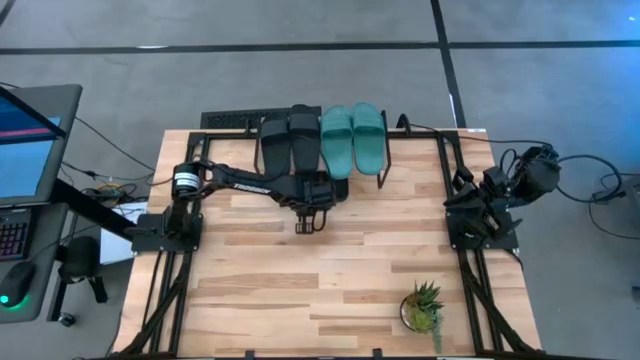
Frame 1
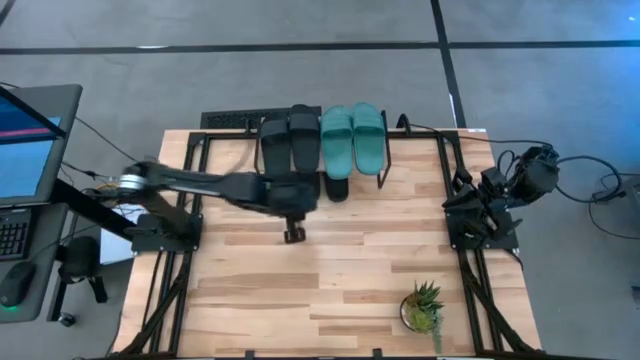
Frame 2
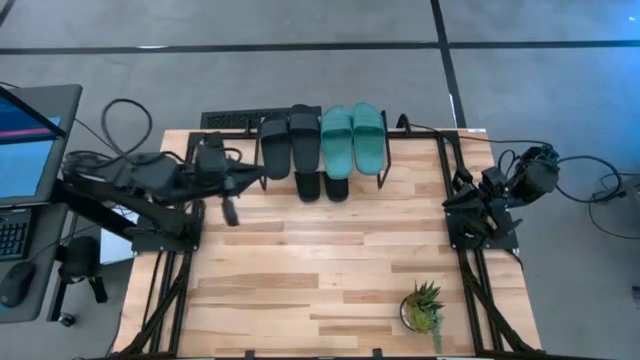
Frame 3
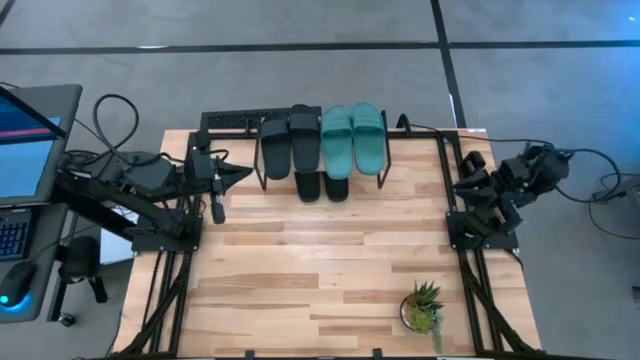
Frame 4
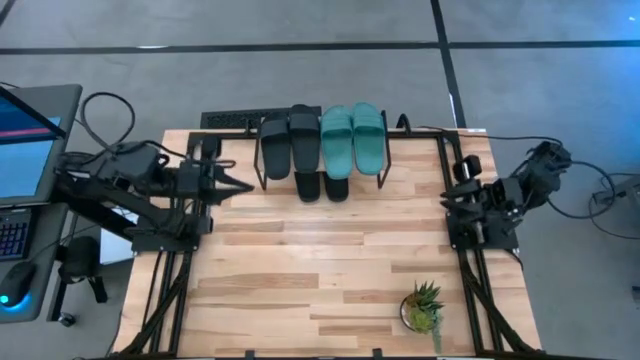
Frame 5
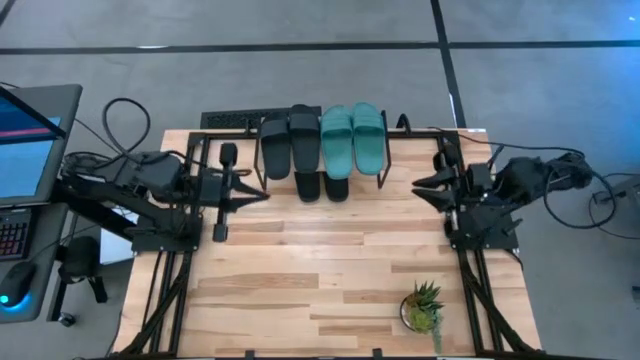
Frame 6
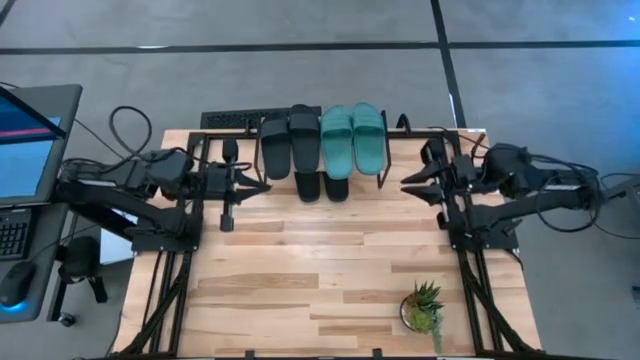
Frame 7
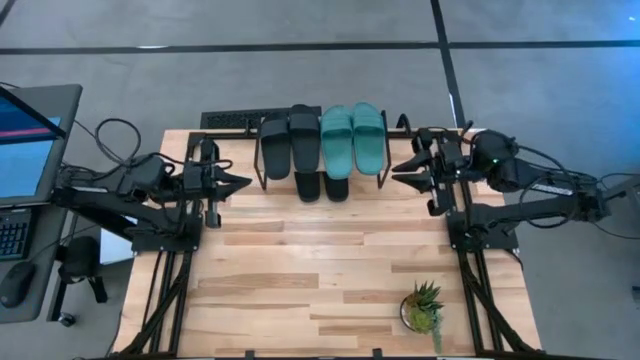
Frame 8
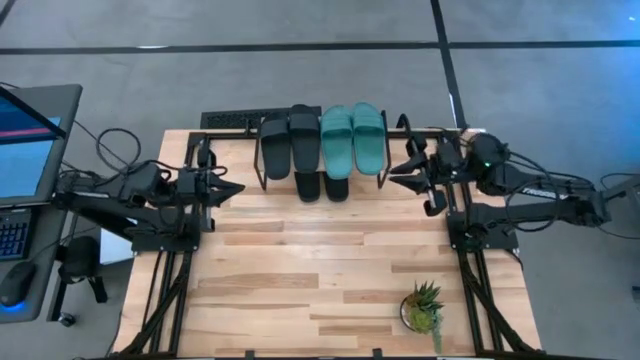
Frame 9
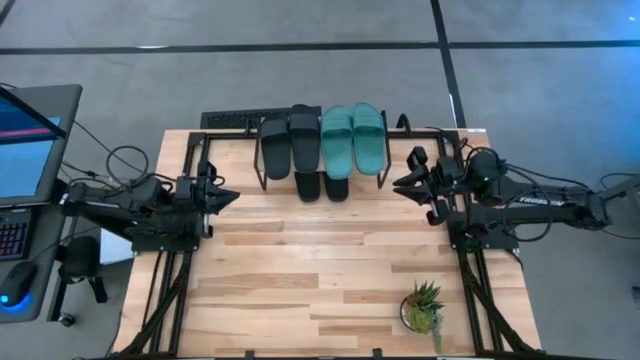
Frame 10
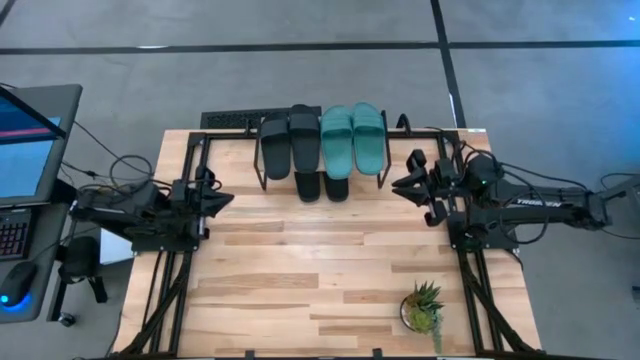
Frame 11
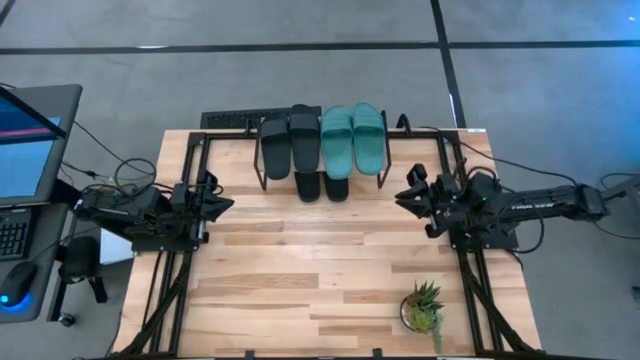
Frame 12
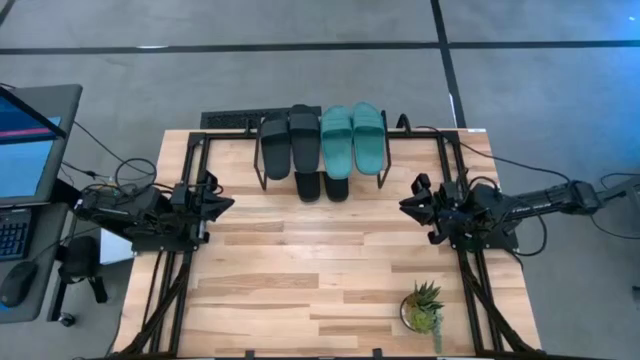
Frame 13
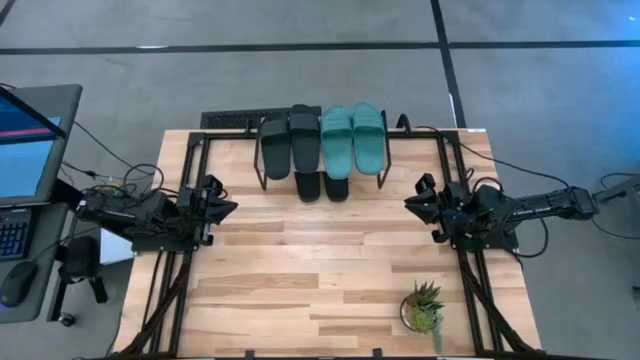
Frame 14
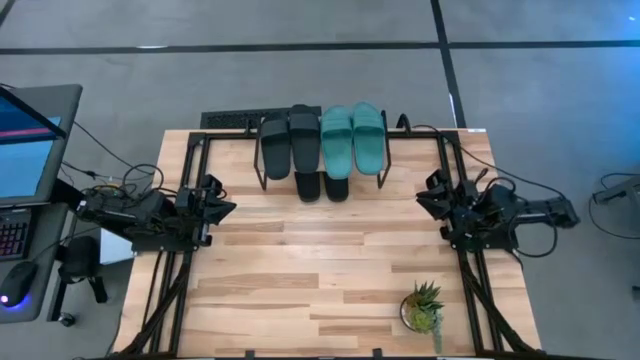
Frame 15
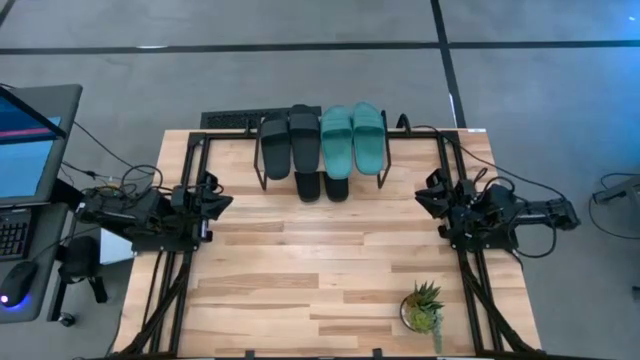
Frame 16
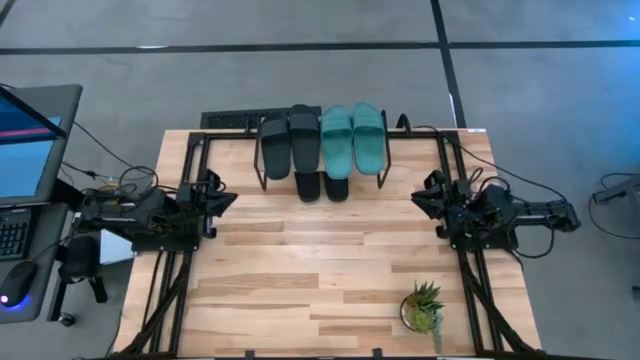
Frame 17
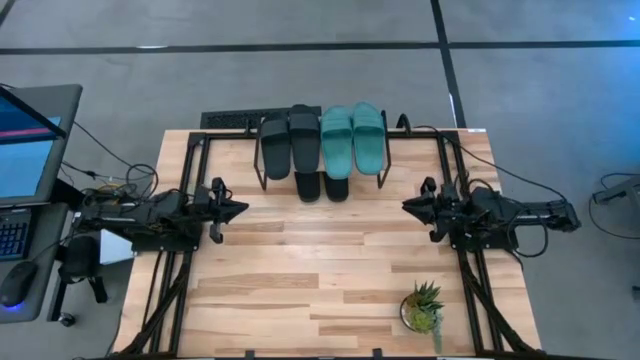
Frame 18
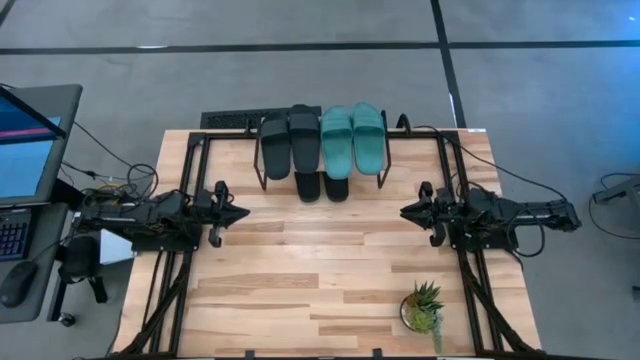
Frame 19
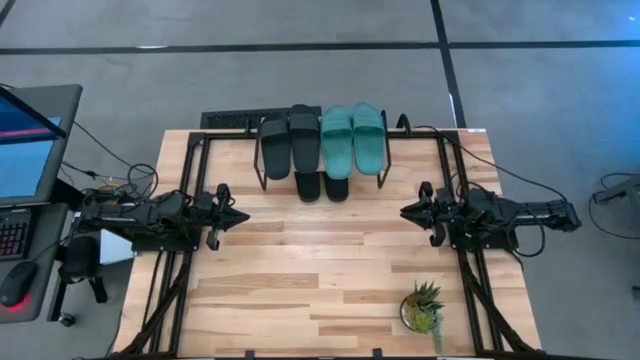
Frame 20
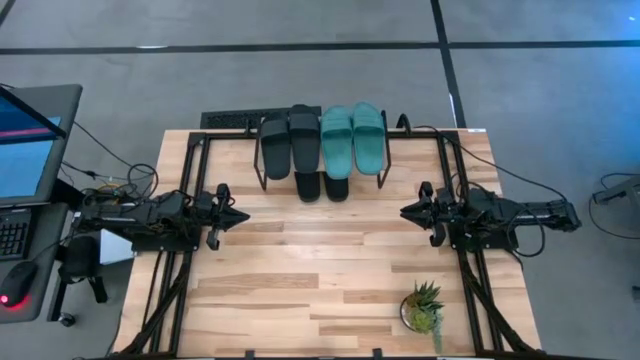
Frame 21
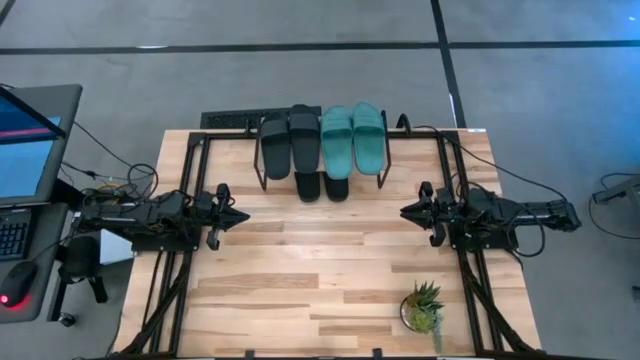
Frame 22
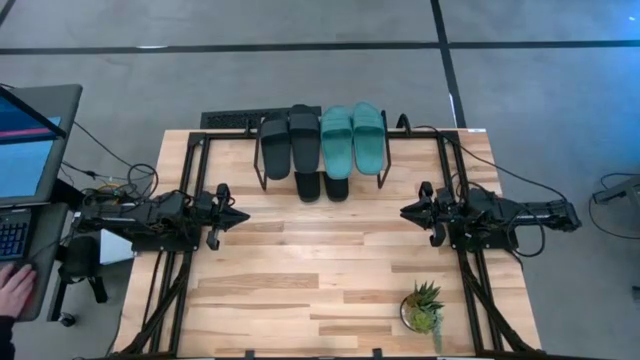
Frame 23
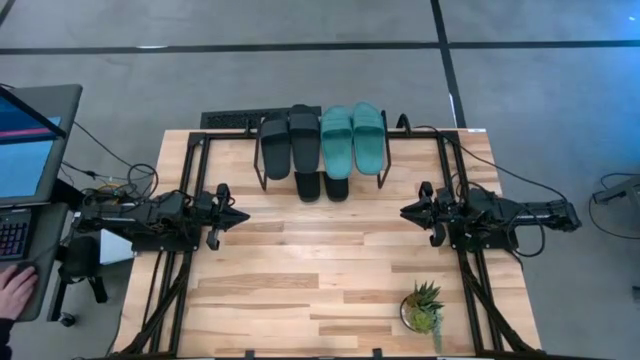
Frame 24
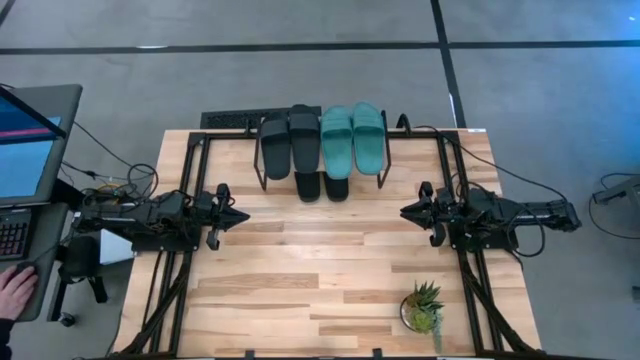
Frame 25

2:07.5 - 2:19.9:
Task: Pick and place slides into the shelf
Return to Home Position

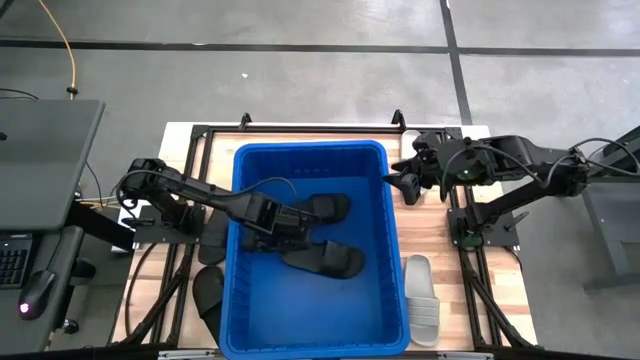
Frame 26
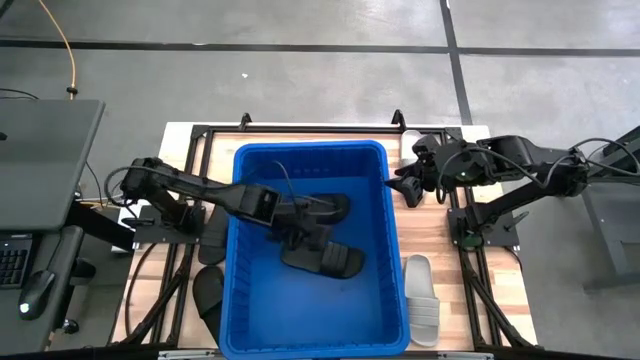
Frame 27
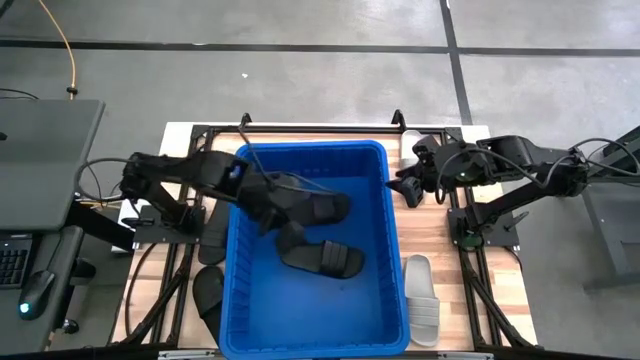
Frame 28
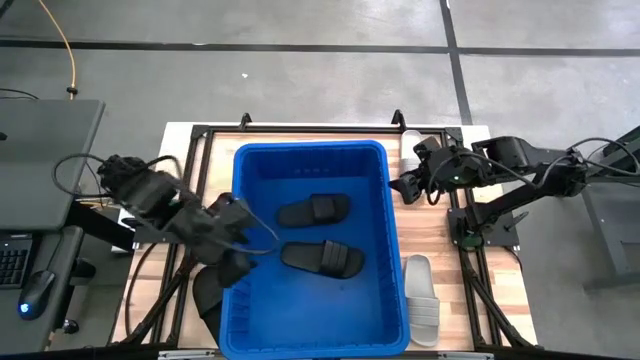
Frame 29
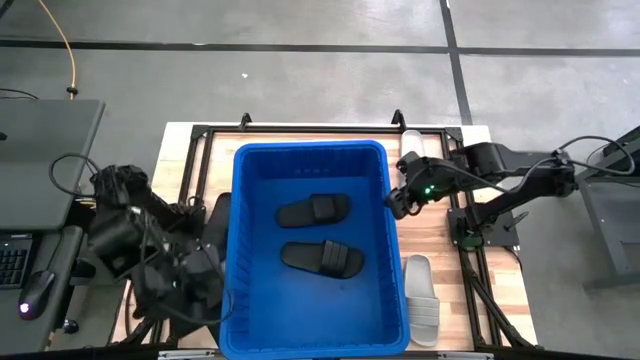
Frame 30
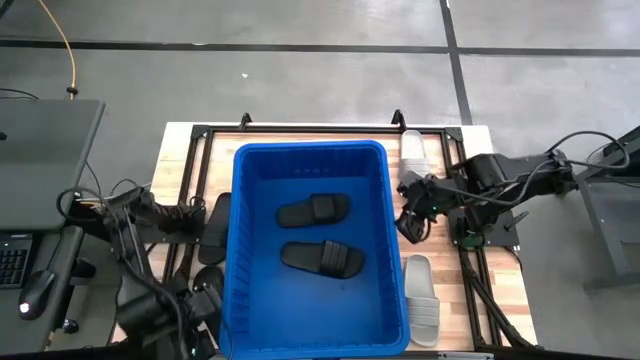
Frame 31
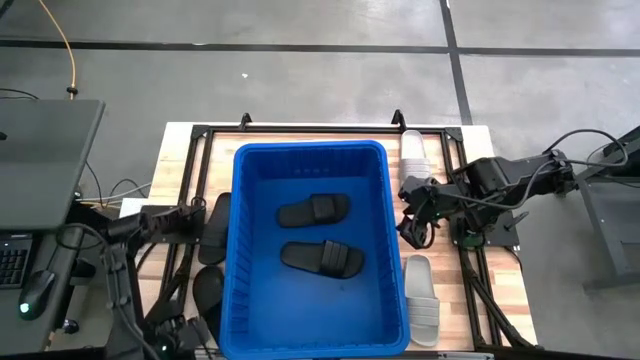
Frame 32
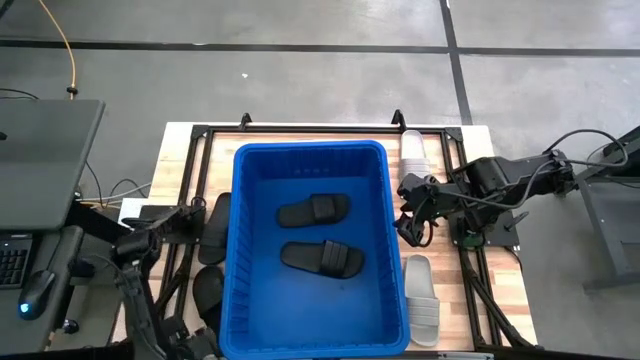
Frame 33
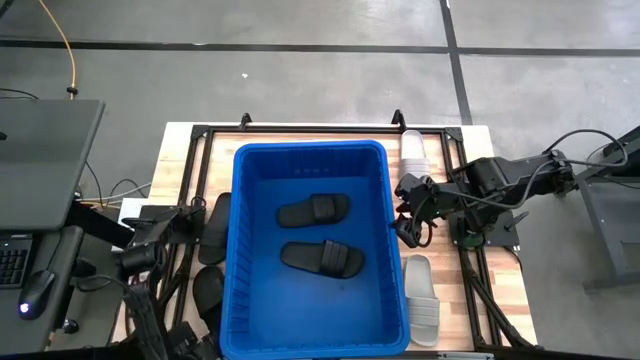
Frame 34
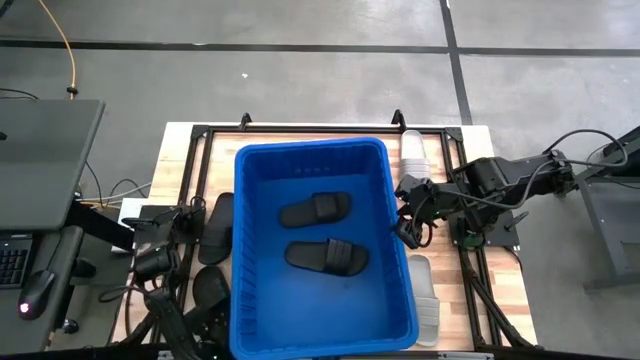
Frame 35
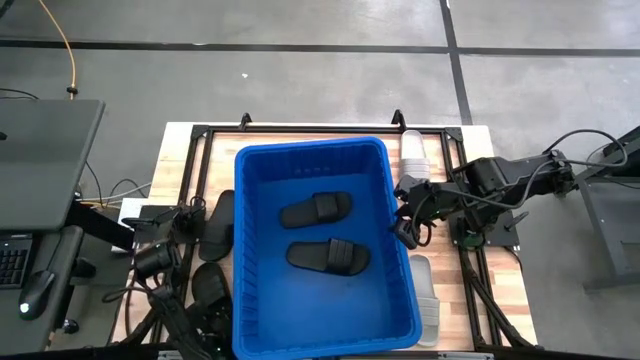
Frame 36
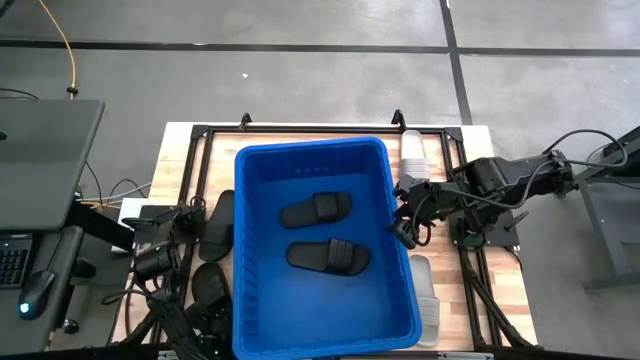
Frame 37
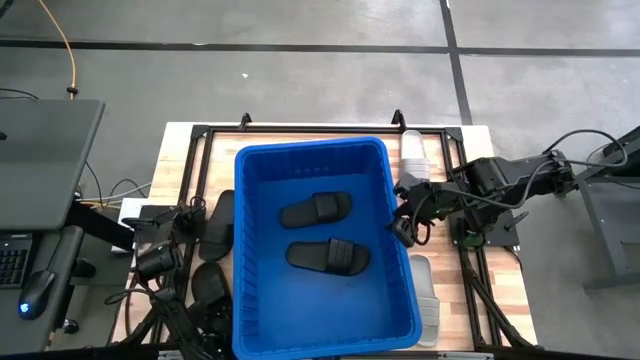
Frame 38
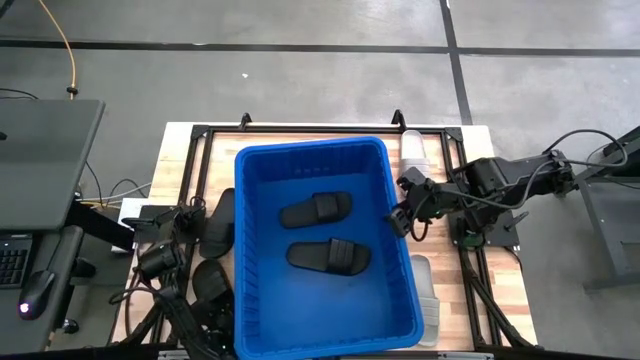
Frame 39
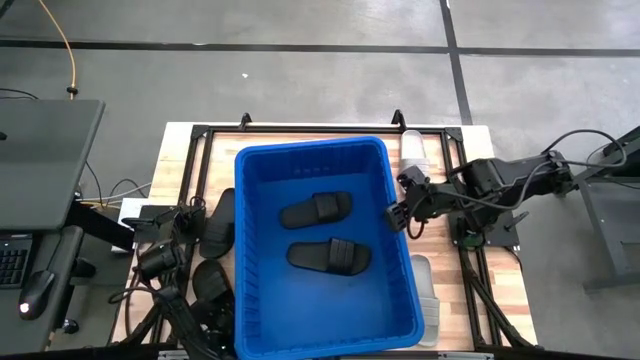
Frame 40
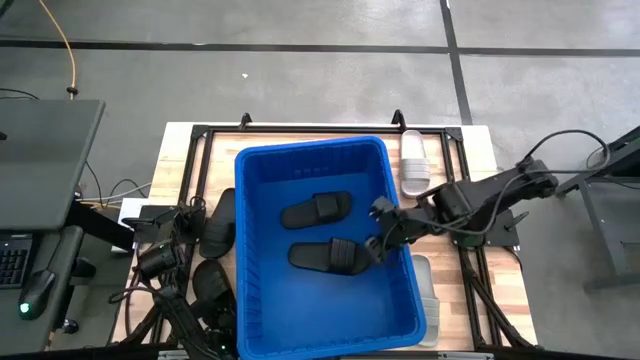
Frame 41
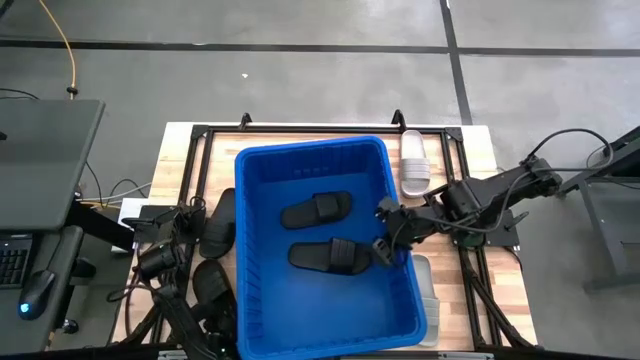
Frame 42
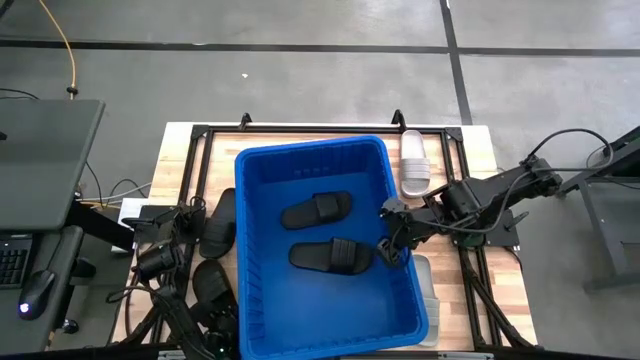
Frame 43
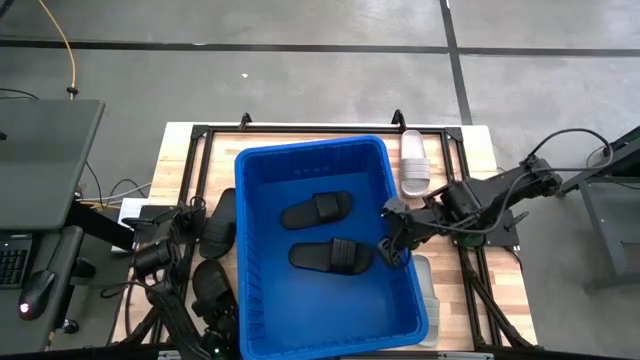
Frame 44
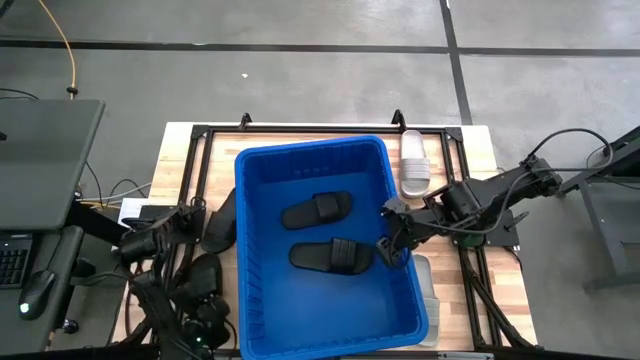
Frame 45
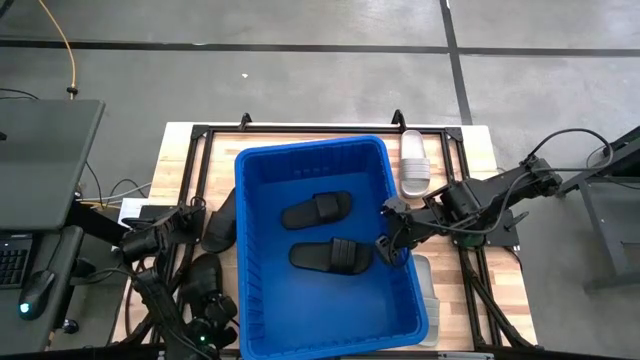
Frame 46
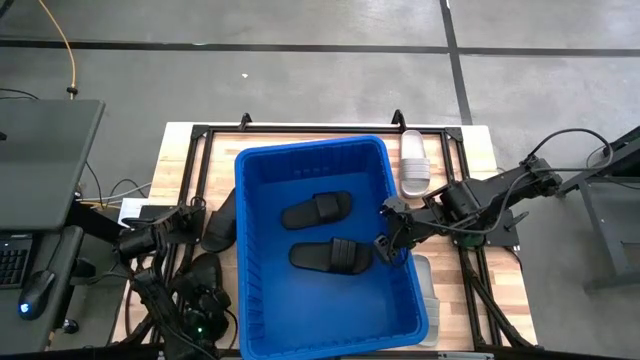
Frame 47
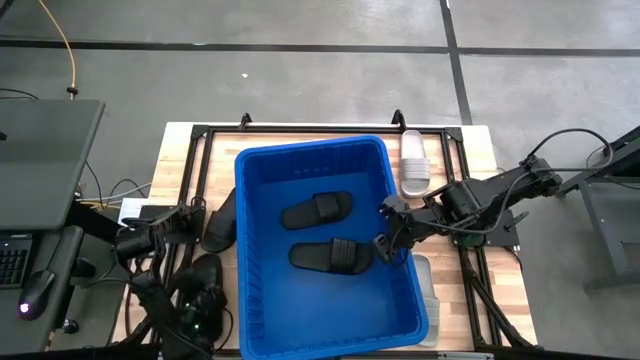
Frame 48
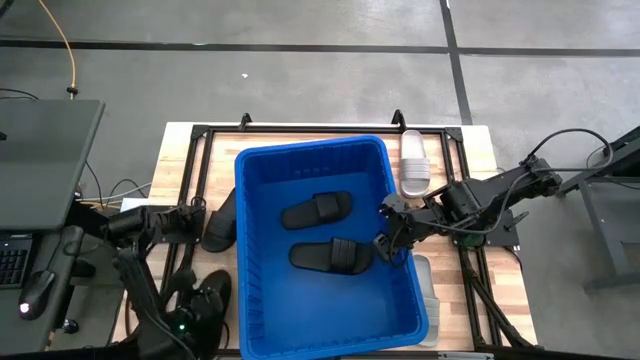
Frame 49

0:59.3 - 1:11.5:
Task: Pick and place slides into bin
Put the bottom black slide in the bin
